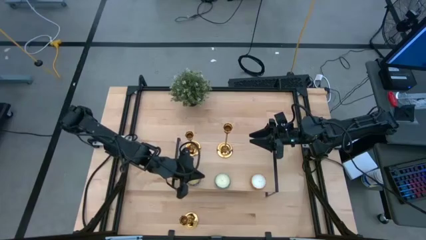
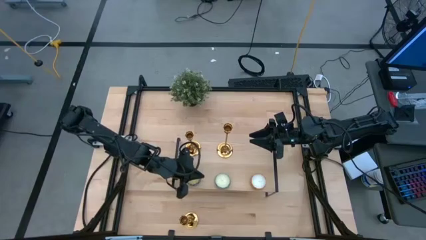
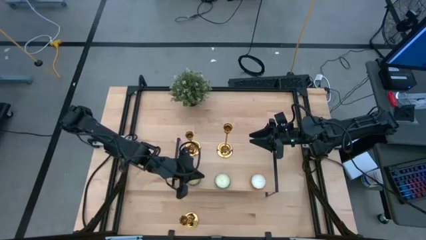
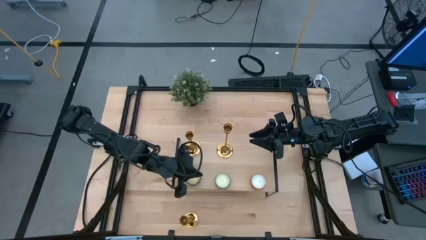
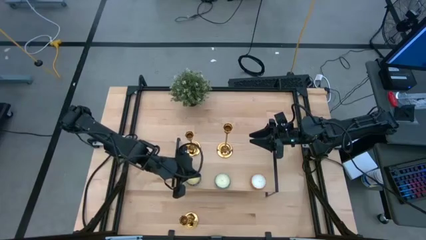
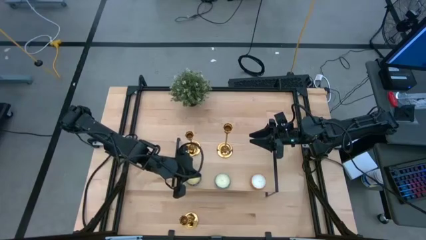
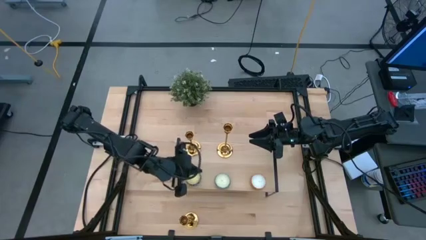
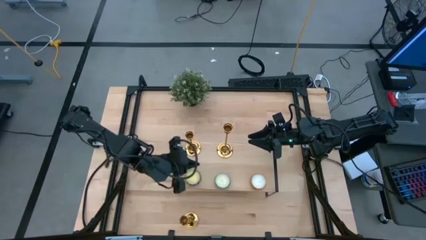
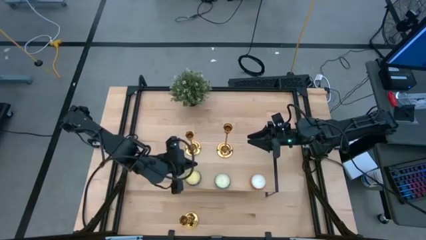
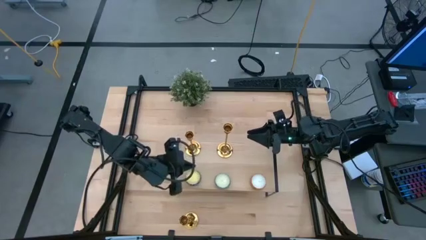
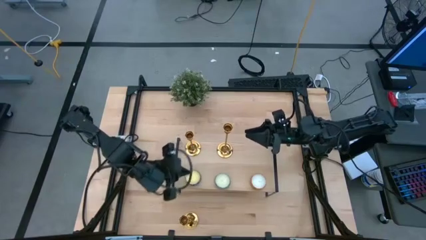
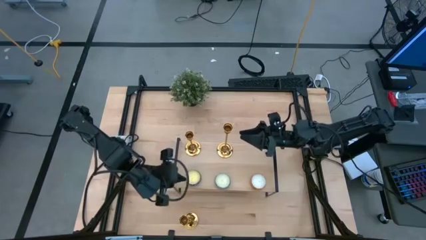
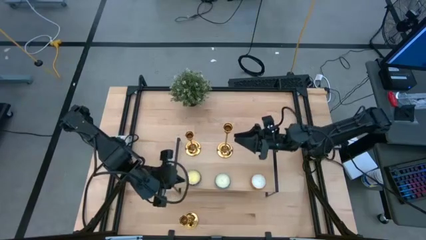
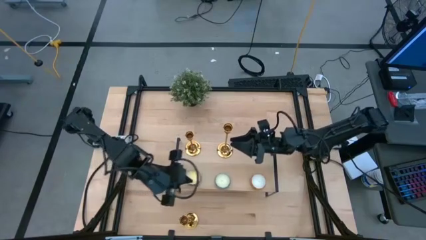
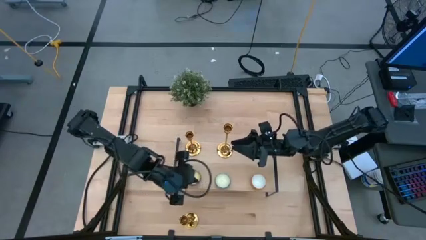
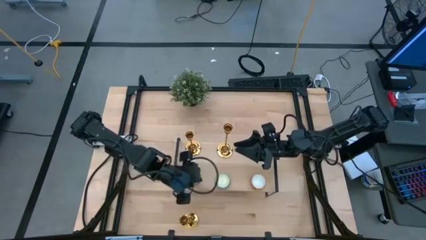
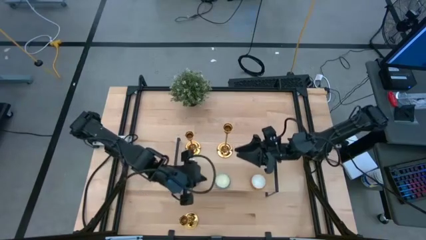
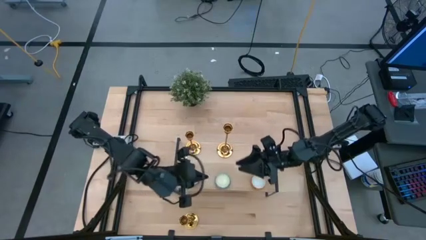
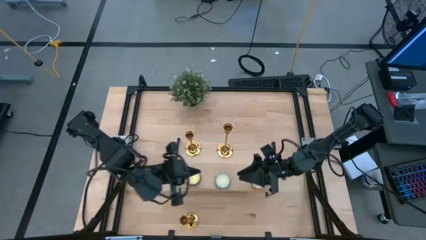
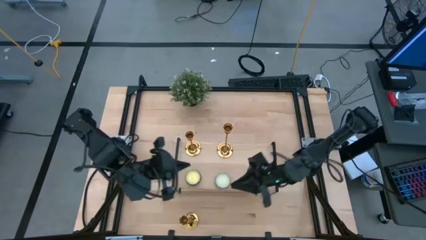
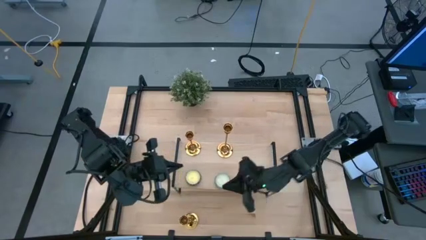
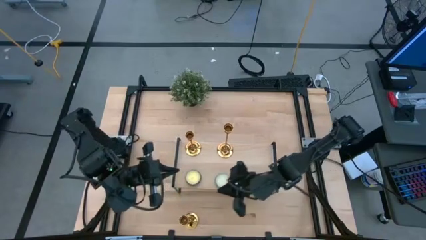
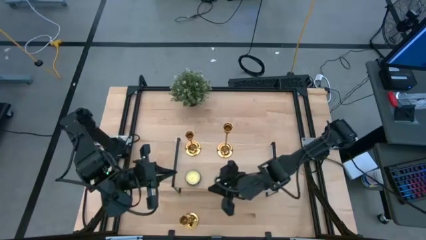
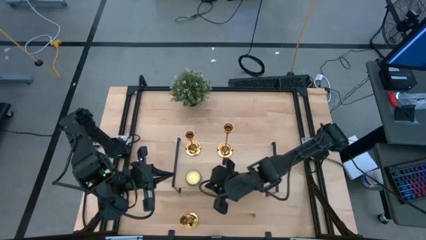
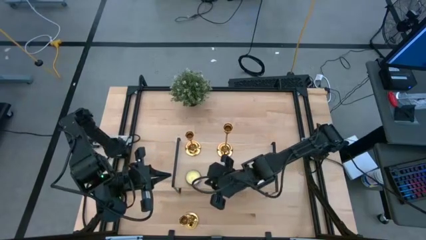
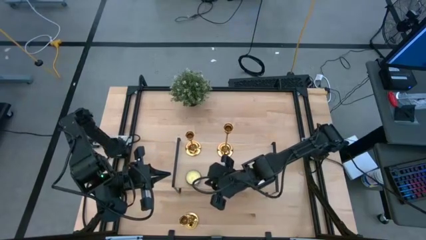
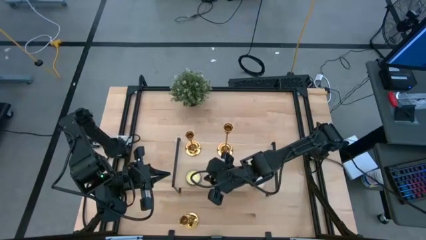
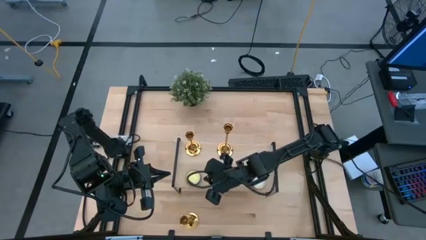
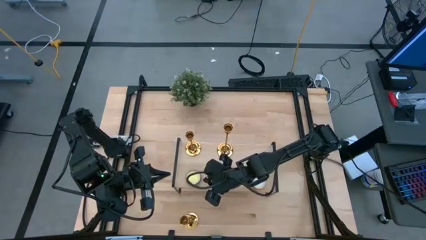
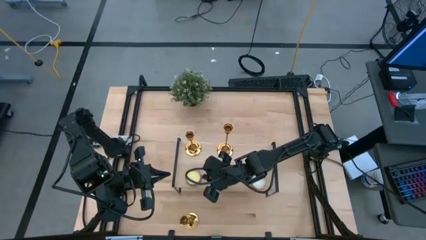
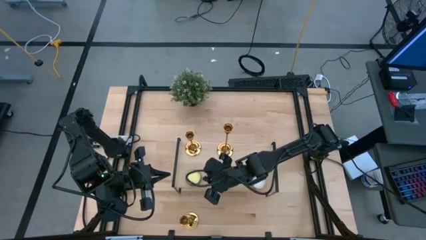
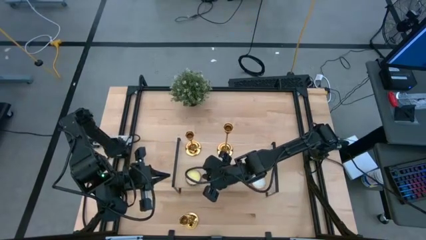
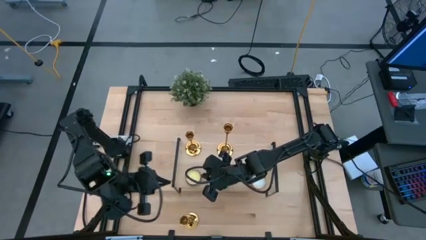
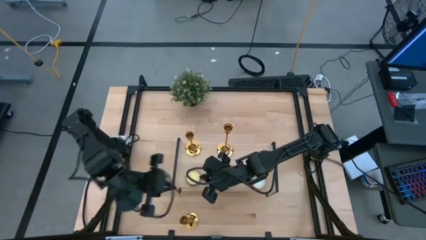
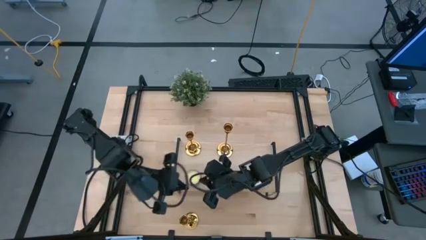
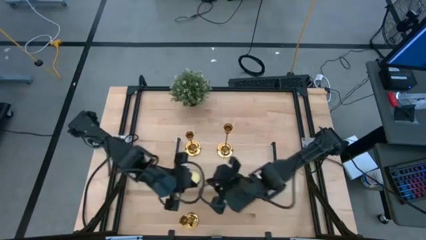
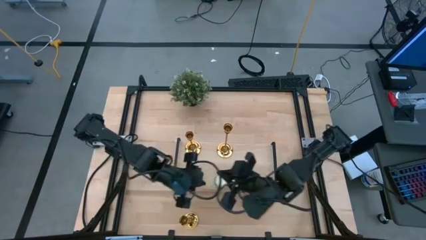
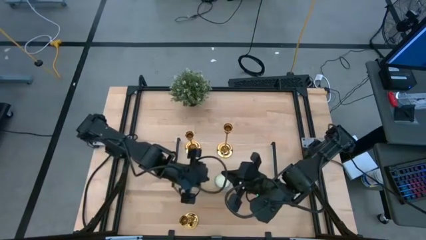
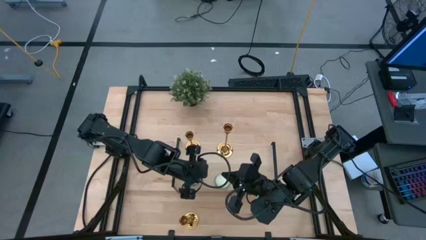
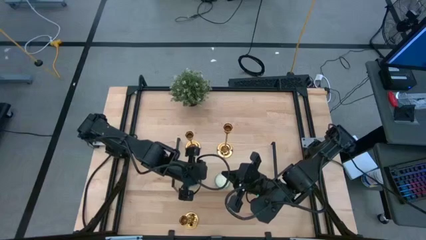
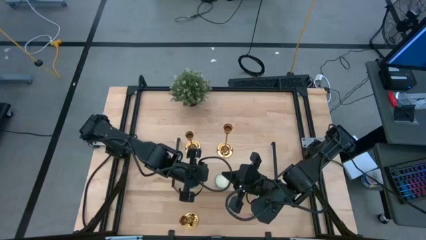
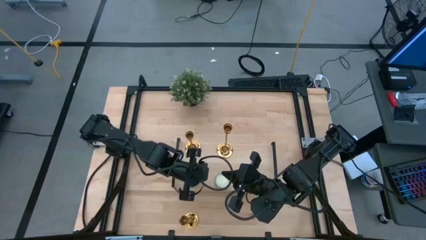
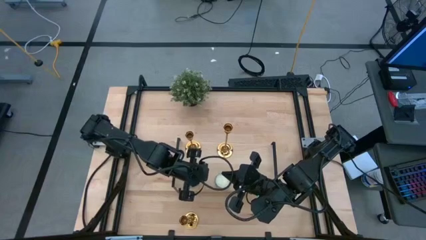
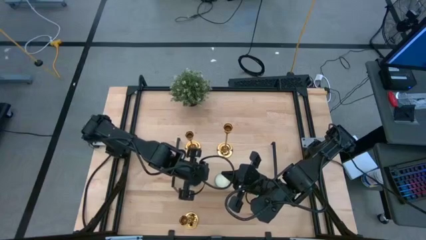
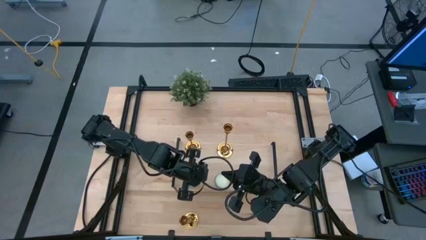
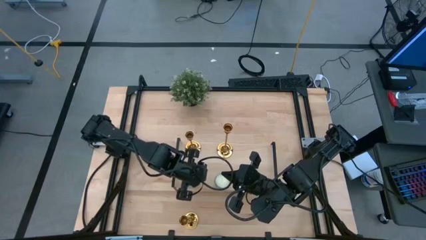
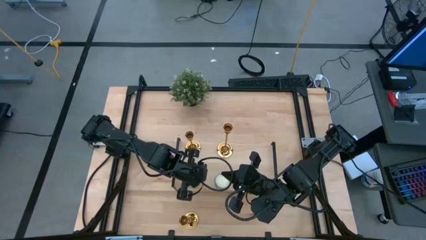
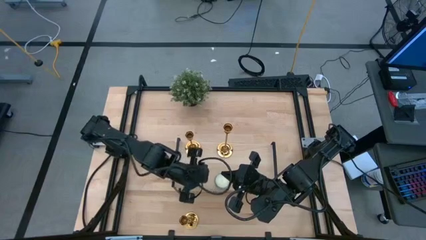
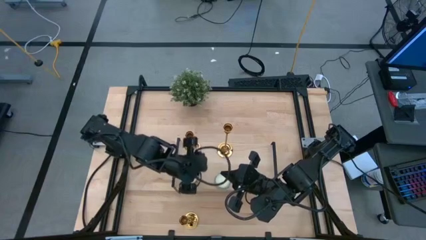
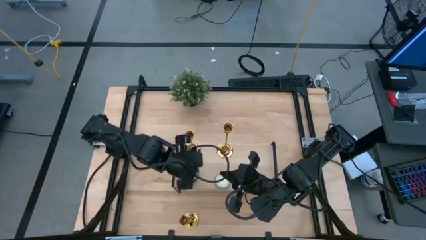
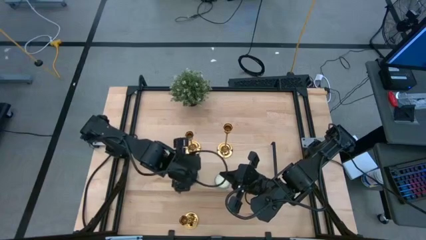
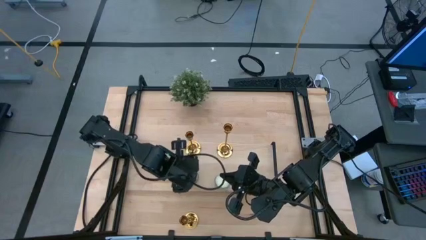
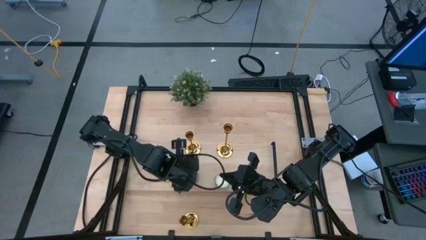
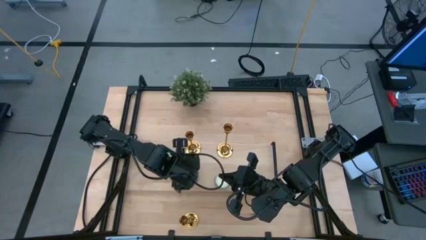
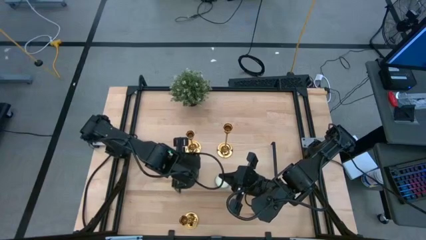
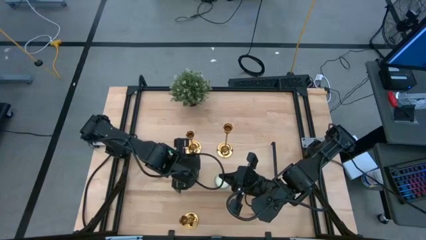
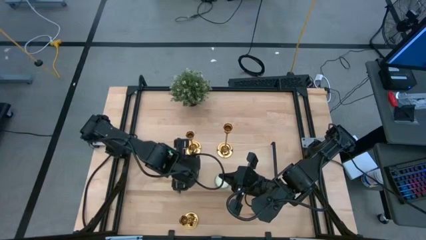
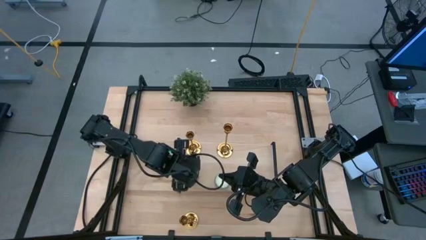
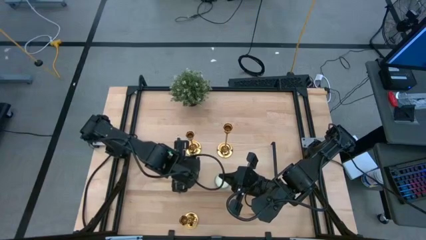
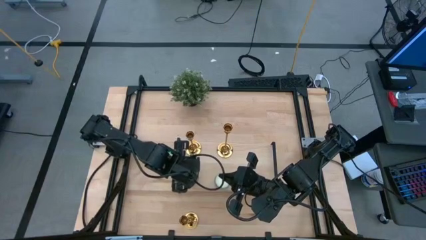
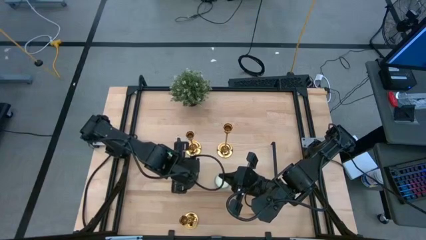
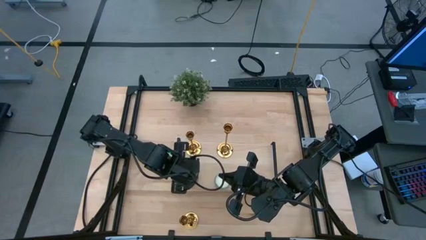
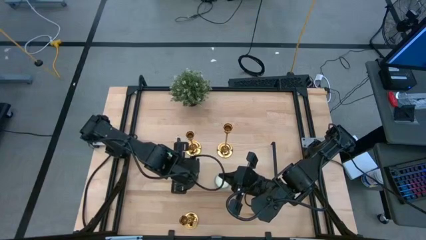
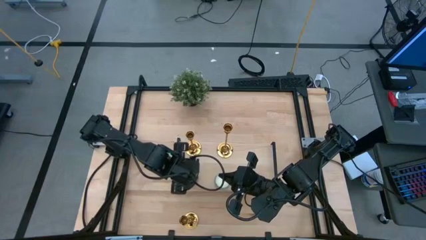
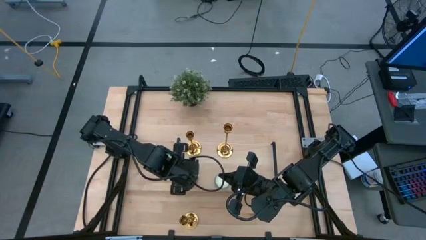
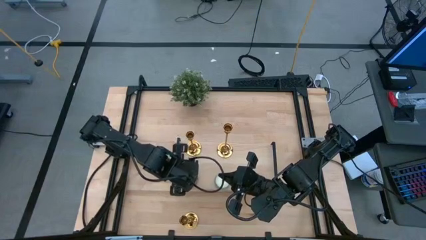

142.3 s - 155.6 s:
Task: Pick & Place candle stick holders
Put the red scented candle on the shelf aligned with the blue scented candle

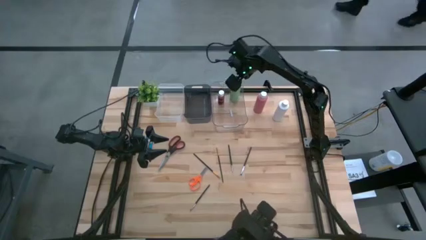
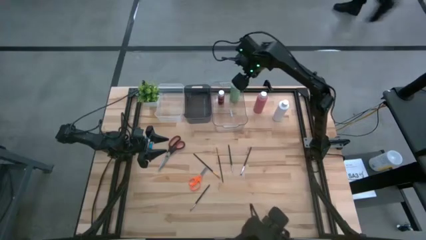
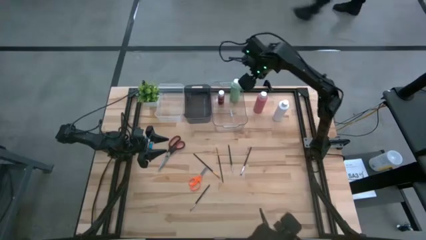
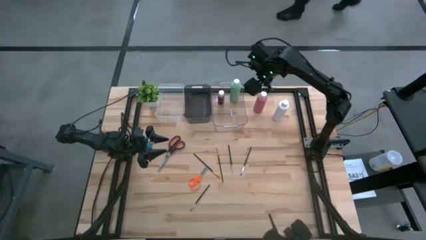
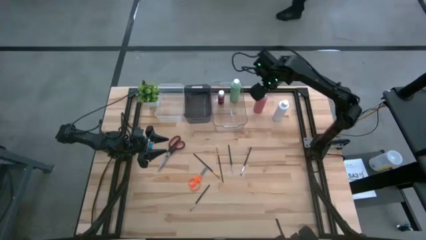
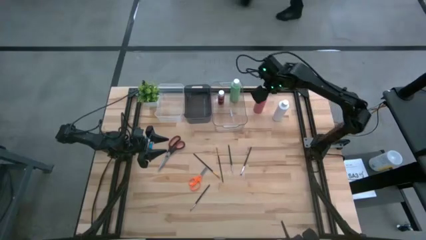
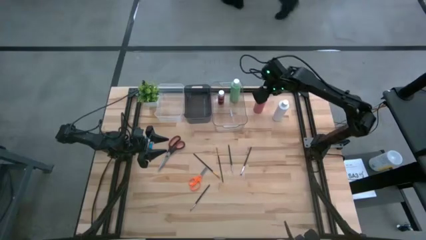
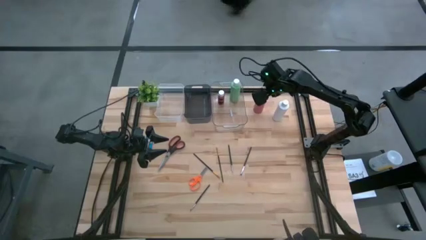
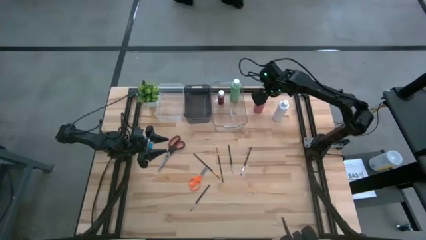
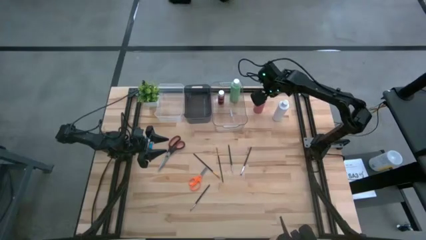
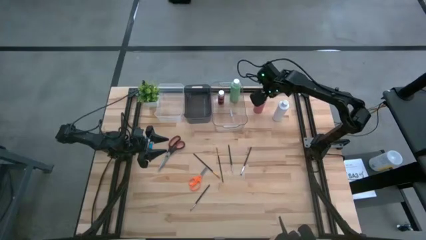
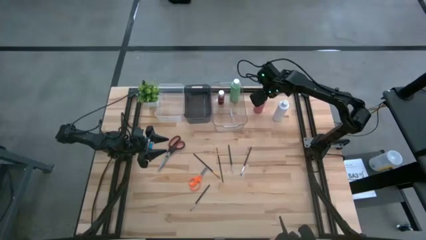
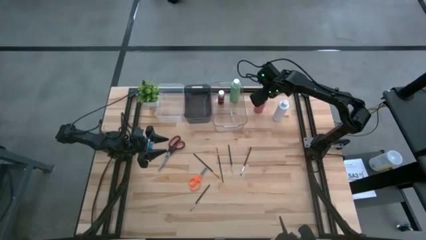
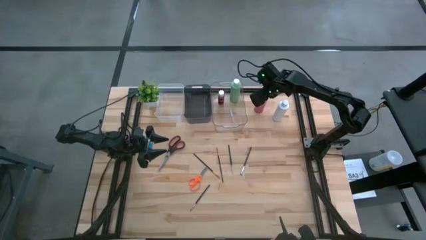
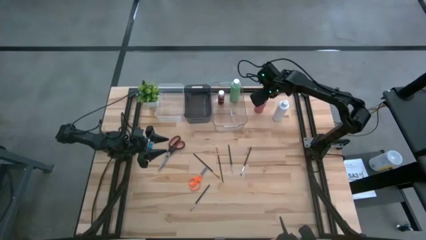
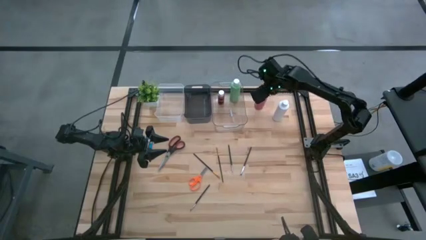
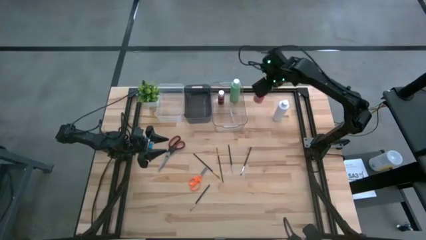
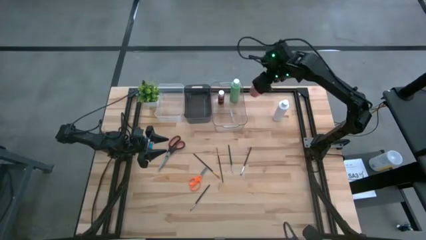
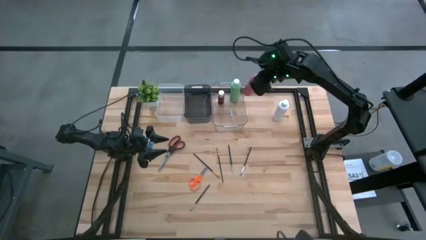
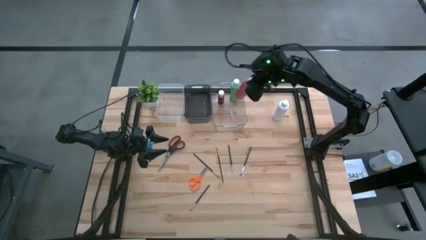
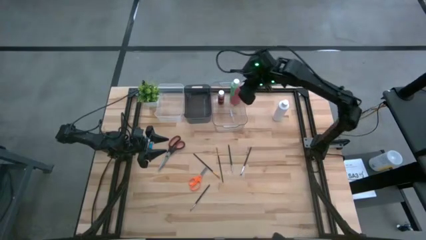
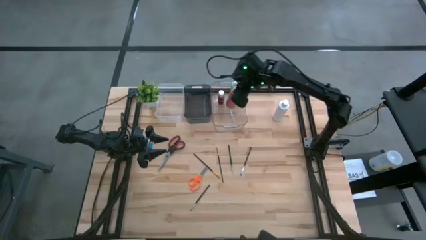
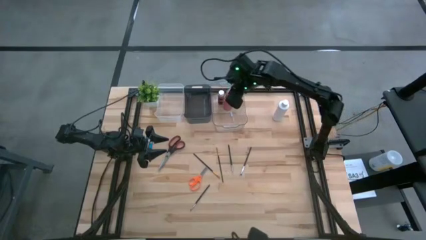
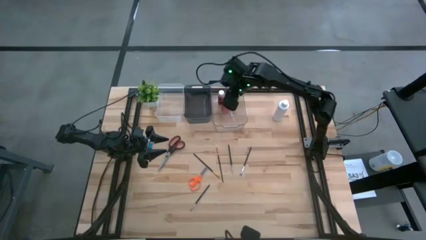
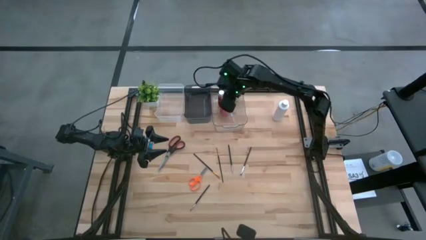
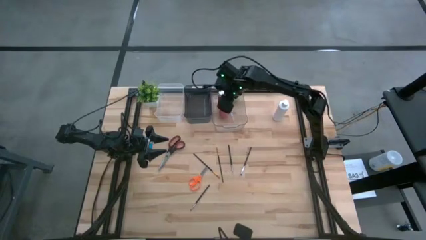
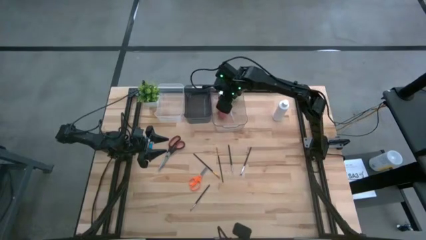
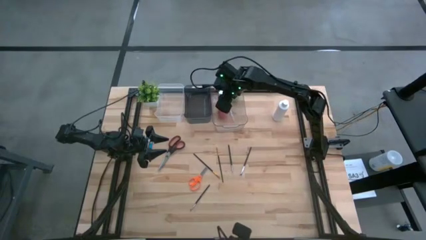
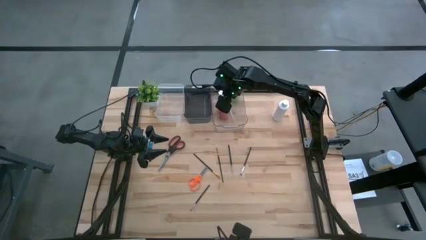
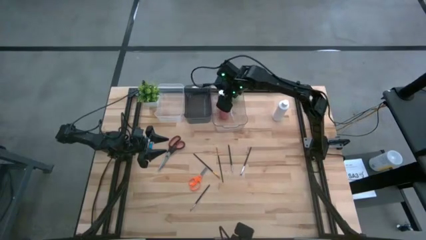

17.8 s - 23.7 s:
Task: Pick & Place Paint Supplies
Put the pink paint bottle into the right transparent bin
